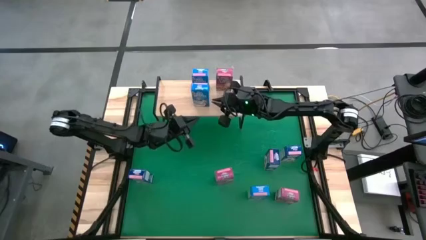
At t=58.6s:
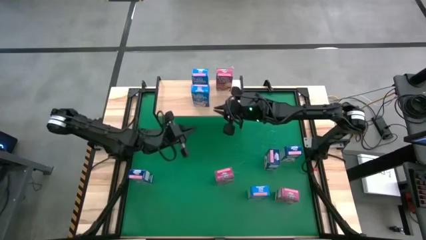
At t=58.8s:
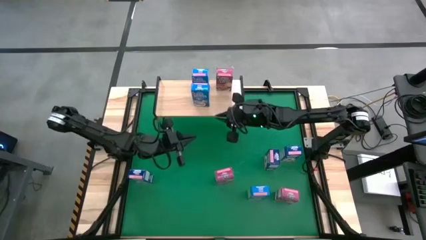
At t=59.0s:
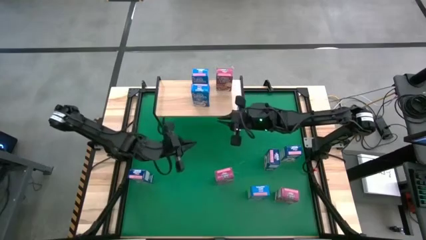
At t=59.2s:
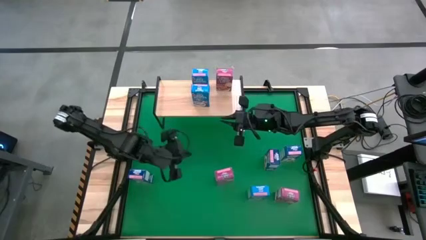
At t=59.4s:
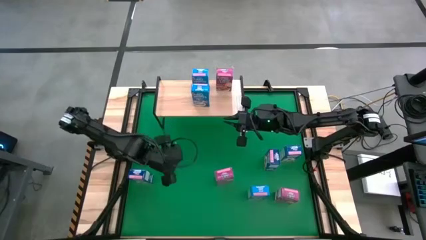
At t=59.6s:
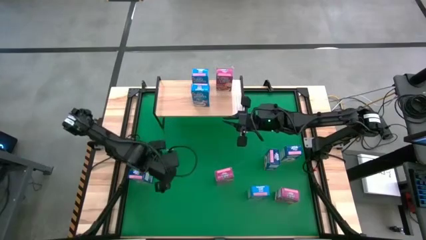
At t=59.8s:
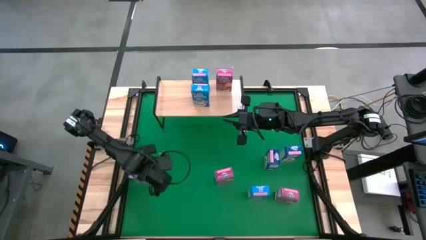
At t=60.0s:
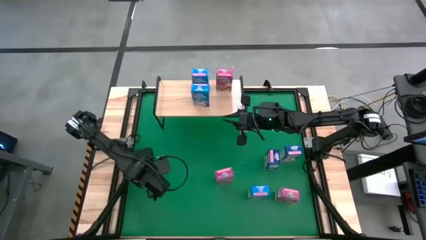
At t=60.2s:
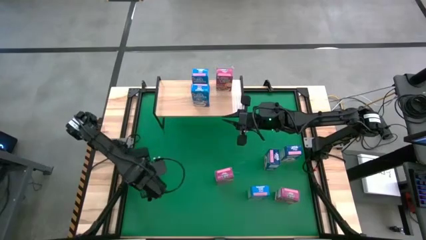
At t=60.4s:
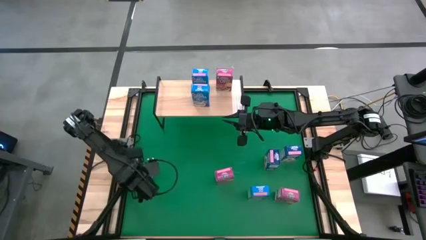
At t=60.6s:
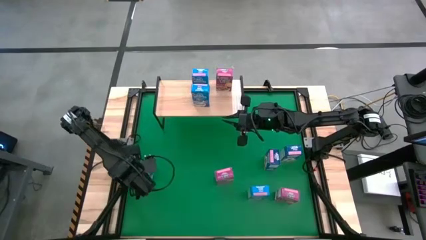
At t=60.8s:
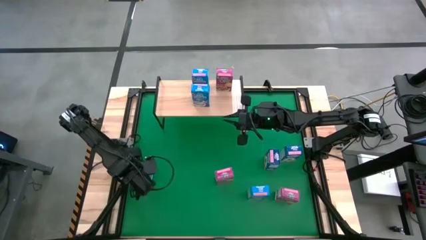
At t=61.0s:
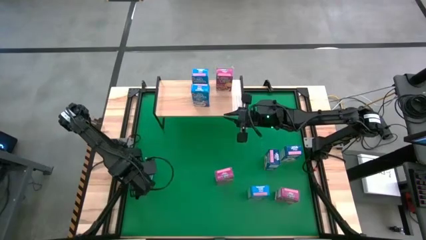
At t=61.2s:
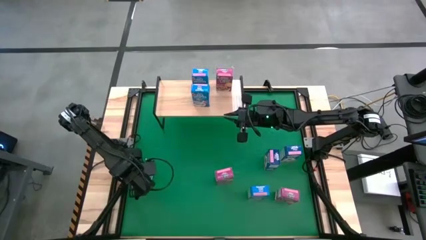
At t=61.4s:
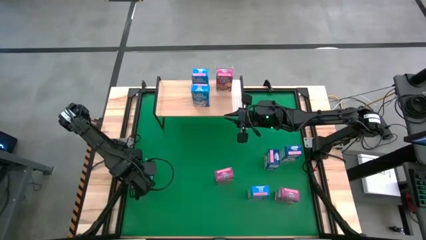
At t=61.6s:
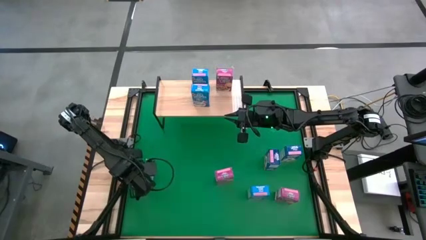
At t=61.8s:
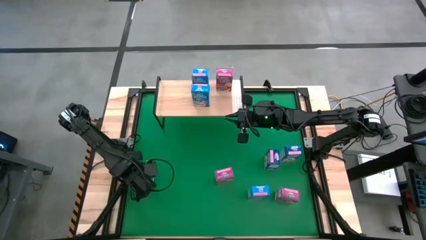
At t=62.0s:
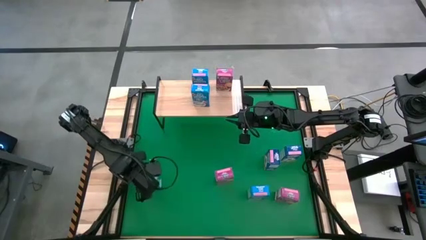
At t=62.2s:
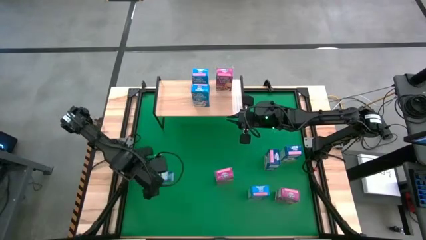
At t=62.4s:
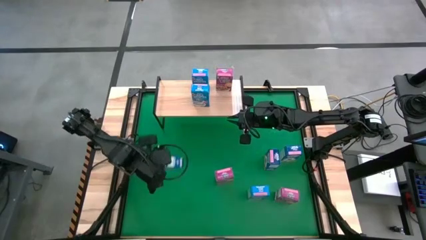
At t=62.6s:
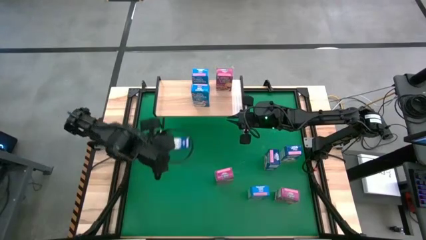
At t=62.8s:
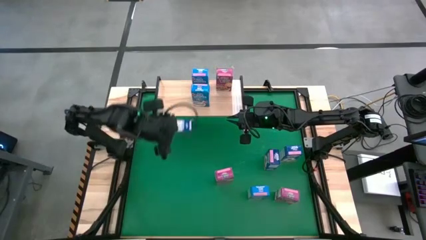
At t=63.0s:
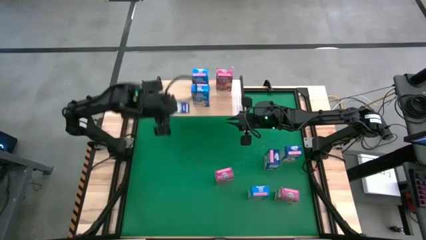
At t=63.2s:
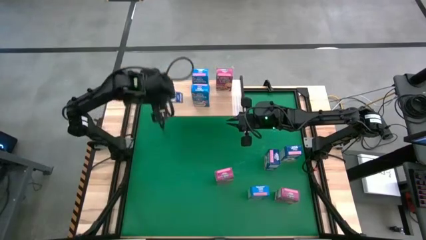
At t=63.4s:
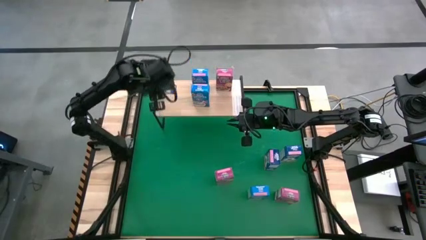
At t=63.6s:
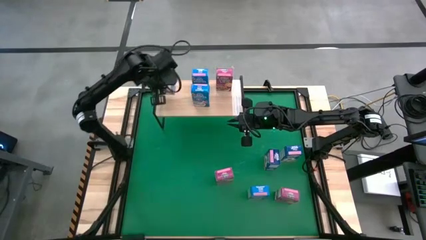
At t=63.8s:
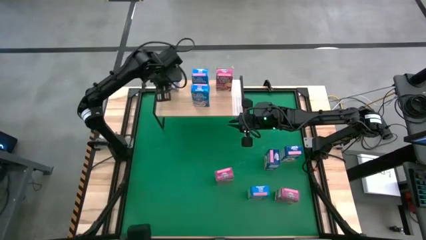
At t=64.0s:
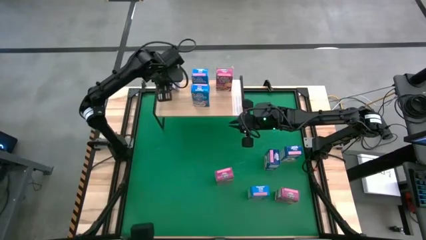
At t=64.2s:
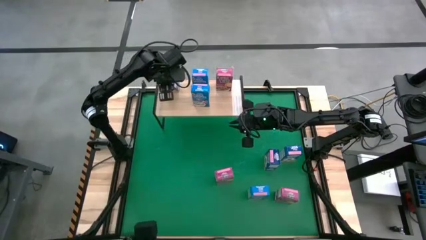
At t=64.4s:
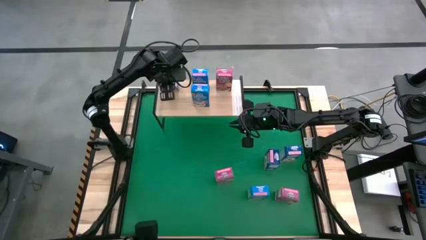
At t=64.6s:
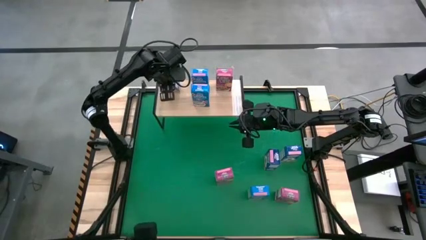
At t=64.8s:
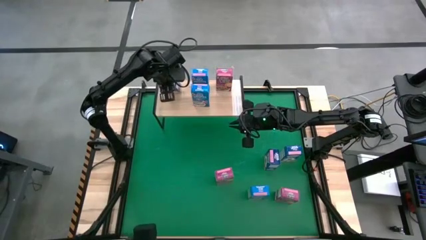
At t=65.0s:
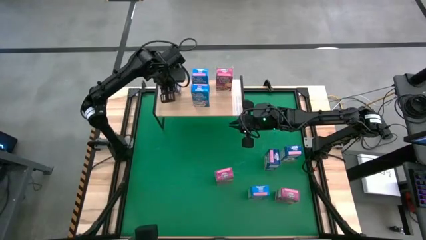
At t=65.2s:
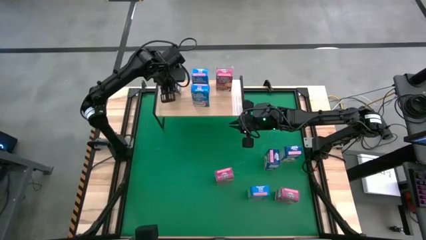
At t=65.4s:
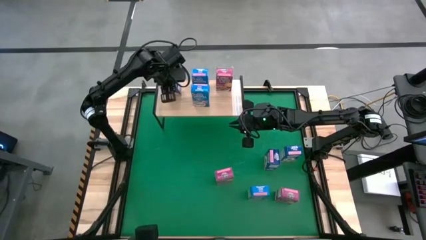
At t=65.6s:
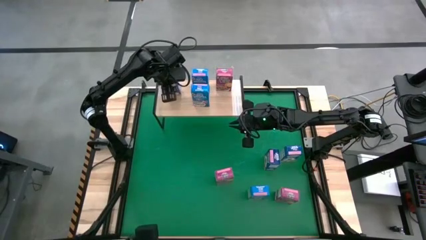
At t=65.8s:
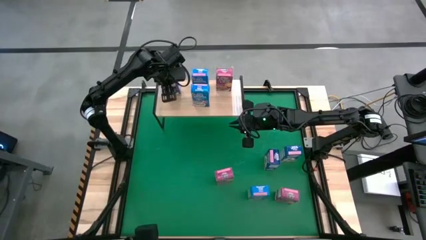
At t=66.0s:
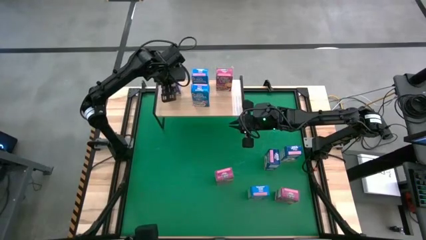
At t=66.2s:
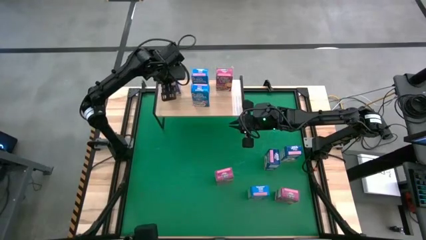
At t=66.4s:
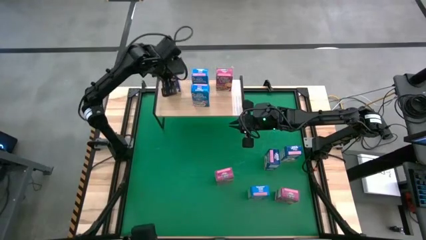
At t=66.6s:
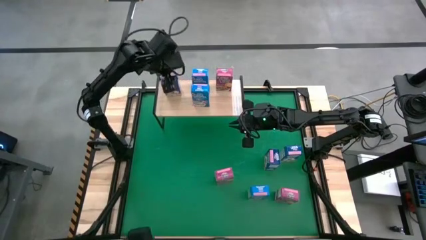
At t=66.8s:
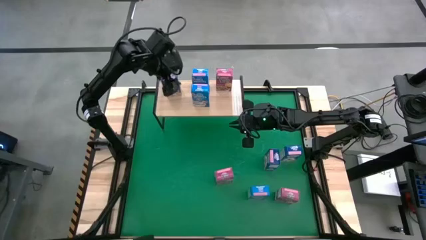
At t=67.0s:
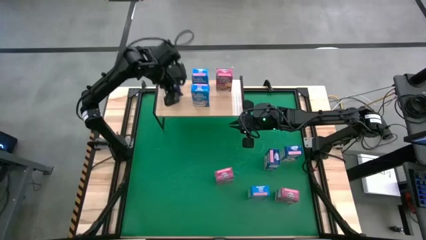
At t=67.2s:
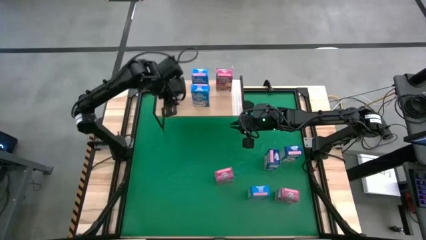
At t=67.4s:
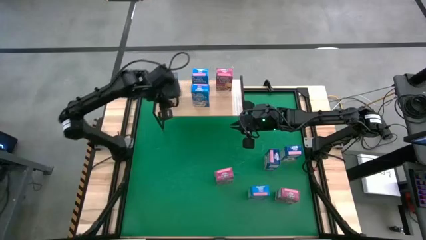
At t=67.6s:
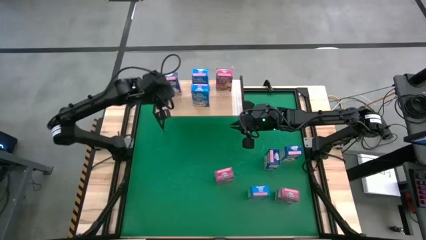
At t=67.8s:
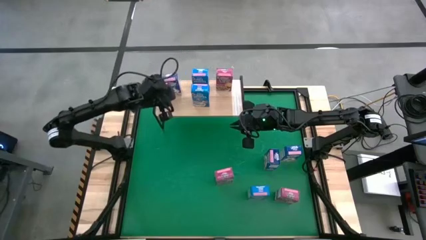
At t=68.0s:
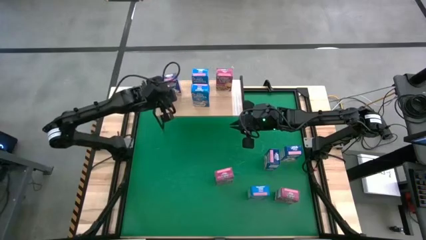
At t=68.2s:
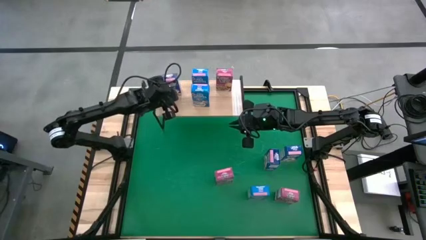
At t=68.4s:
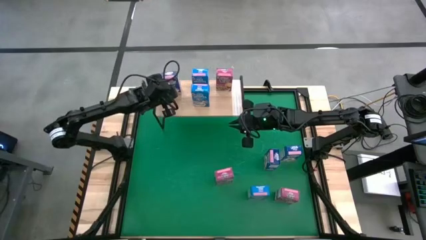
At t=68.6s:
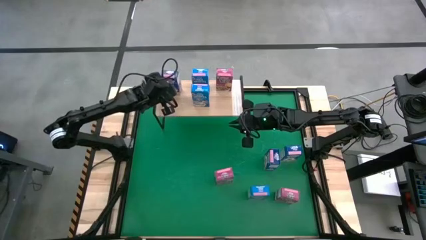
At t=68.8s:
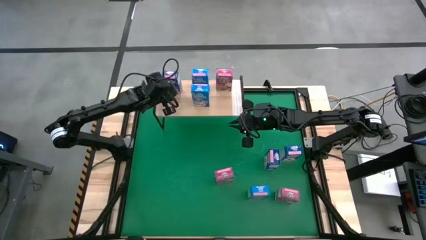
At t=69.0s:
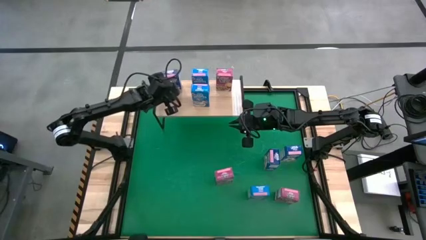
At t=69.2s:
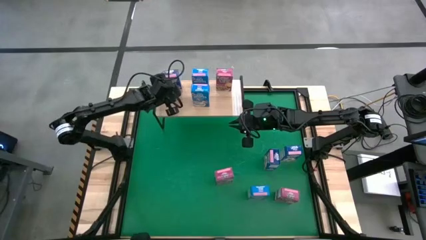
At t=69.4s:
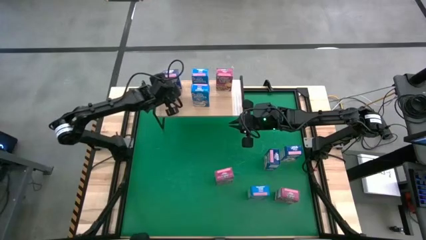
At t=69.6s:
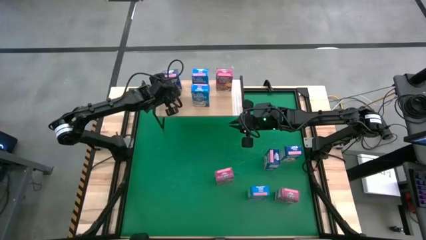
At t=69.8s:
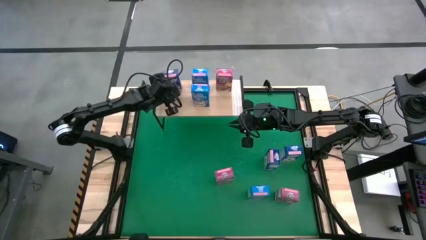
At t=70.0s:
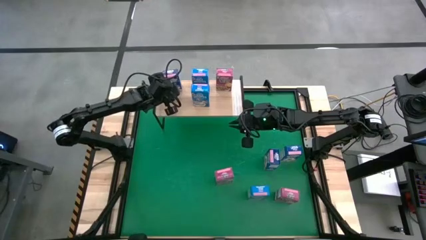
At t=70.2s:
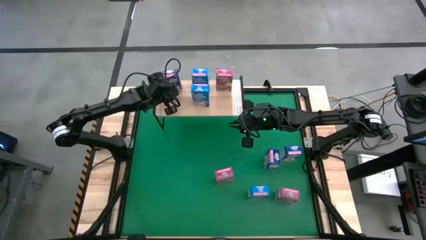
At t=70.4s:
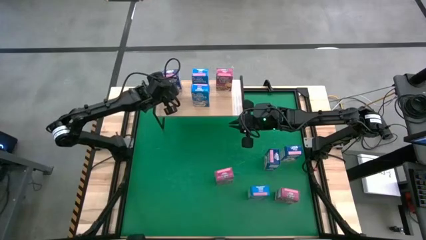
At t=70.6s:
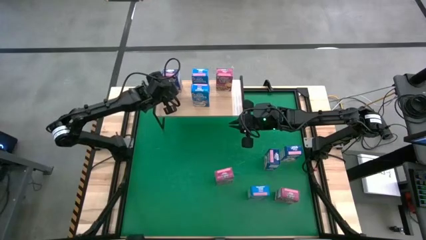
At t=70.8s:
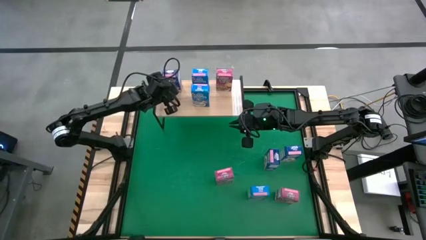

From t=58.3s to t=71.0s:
Task: Stack cereal on shelf
Put the left blue cereal box on the shelf

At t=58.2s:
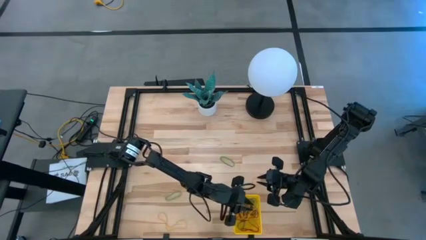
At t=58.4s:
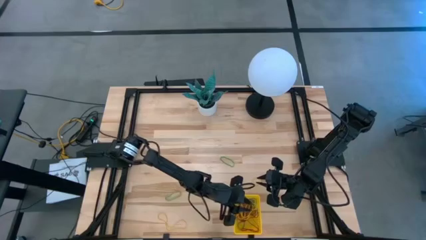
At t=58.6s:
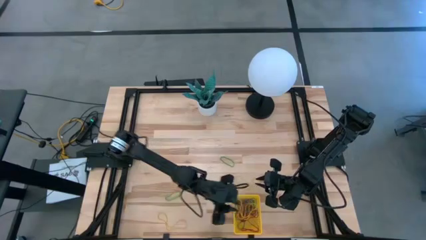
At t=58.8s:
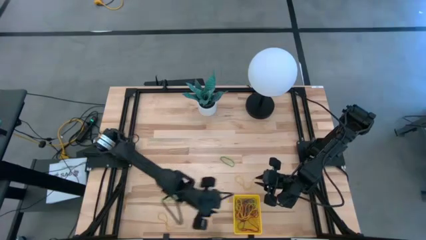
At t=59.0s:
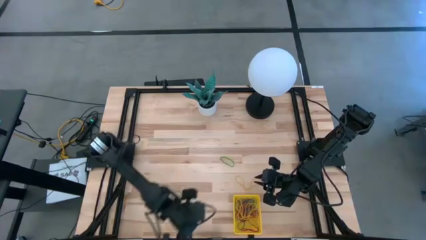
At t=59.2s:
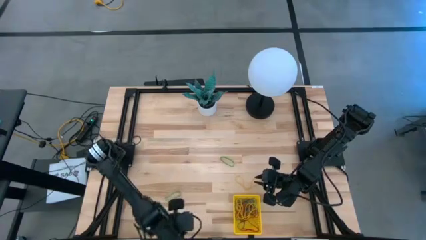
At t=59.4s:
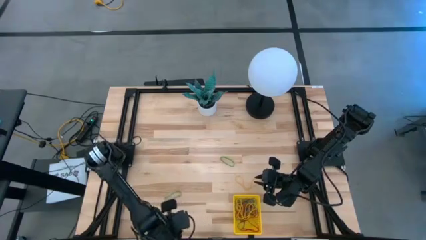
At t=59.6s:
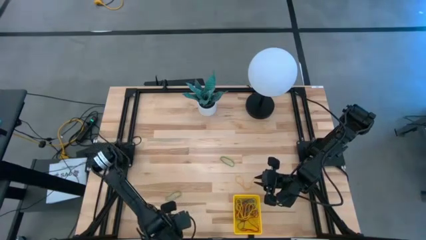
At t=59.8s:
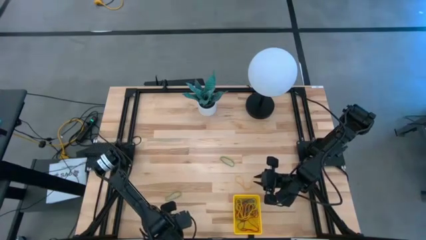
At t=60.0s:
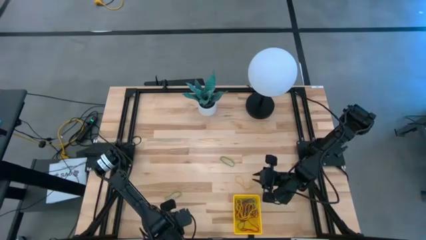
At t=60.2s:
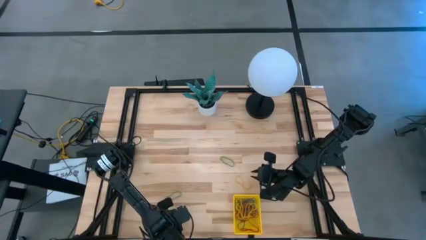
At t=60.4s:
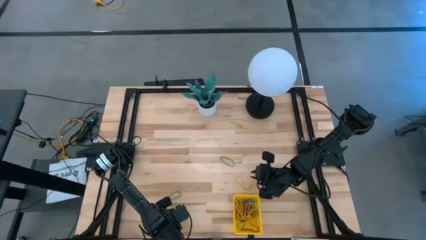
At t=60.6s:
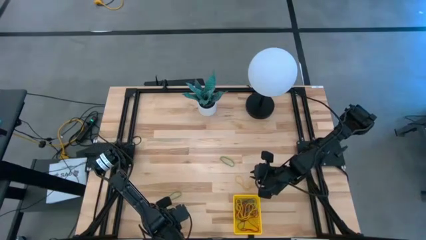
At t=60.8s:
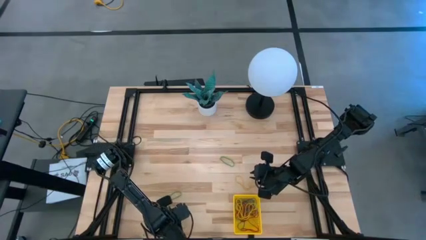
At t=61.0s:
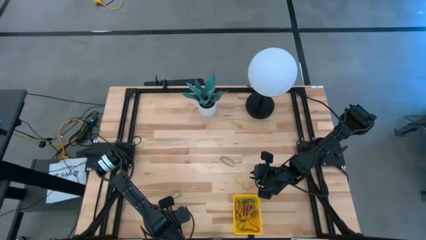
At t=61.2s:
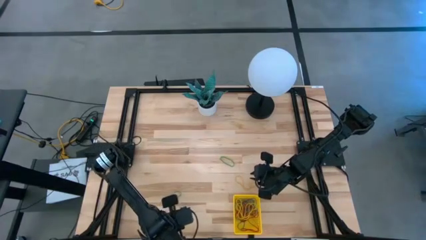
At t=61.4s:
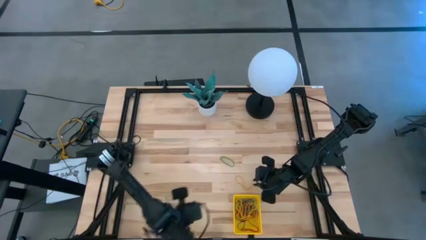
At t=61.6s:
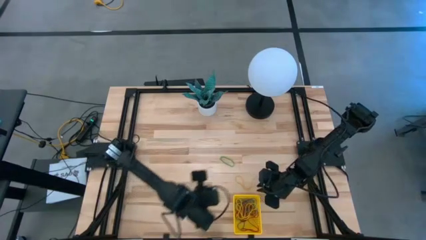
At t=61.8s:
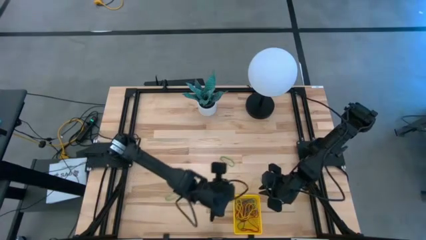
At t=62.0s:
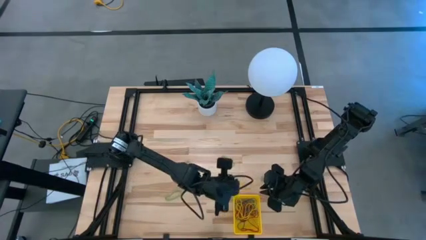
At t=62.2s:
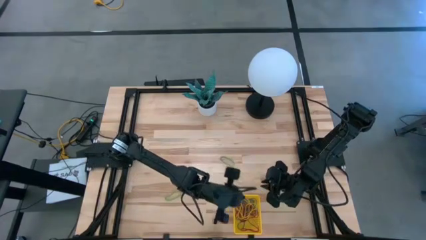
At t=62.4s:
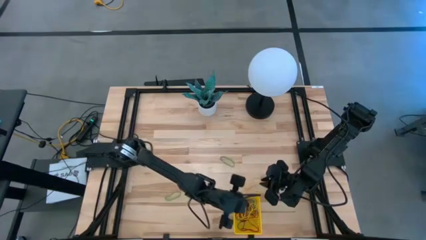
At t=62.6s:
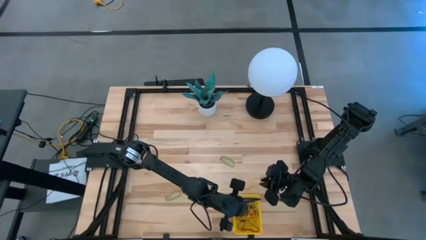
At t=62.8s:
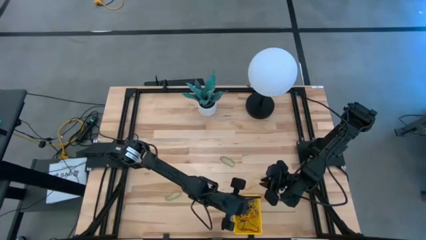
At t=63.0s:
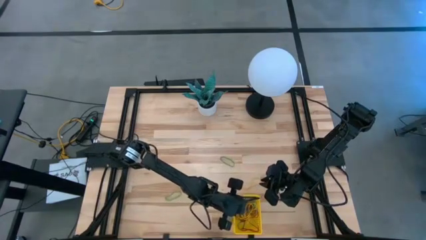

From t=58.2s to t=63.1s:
Task: Pick and place rubber bands into bin
Put the yellow rubber band into the yellow basket
